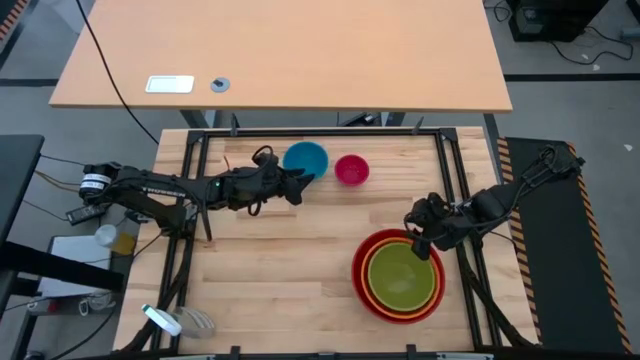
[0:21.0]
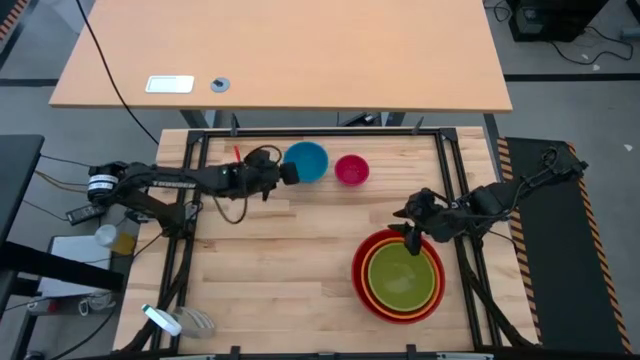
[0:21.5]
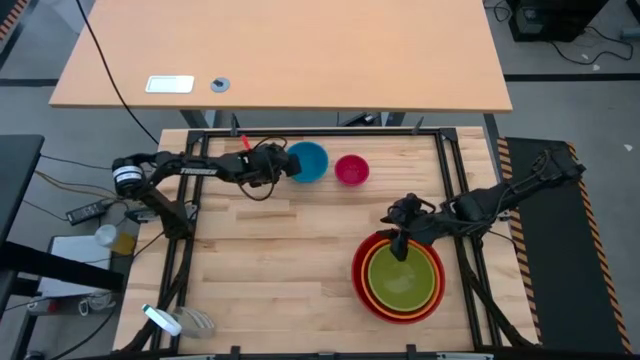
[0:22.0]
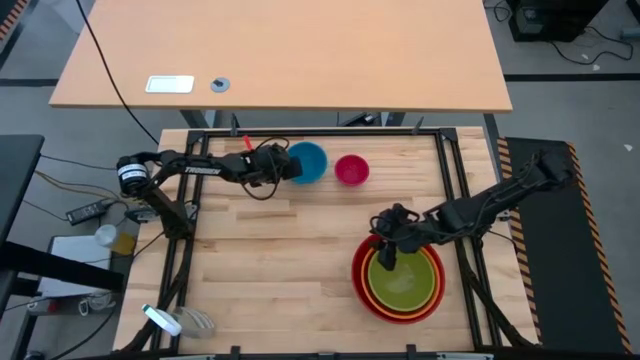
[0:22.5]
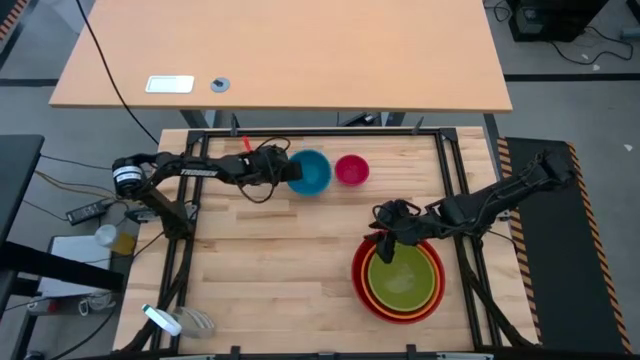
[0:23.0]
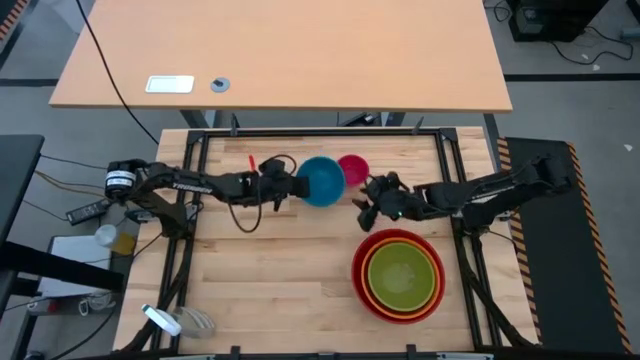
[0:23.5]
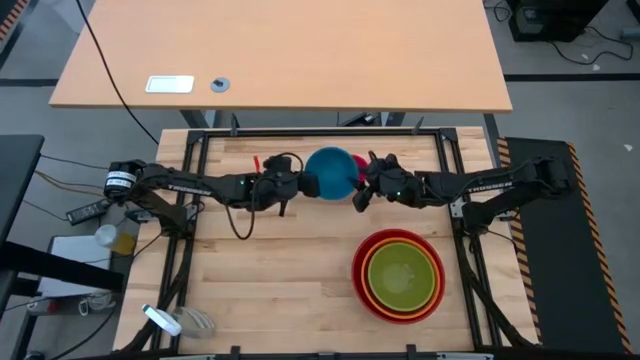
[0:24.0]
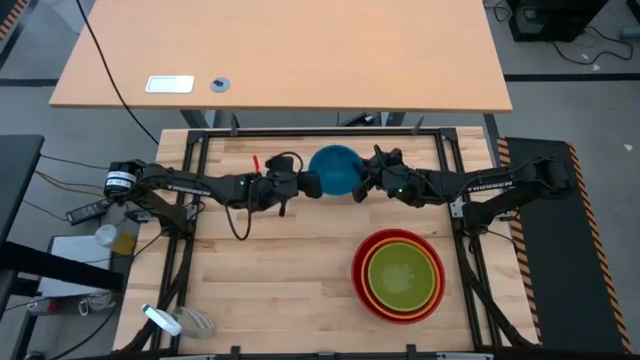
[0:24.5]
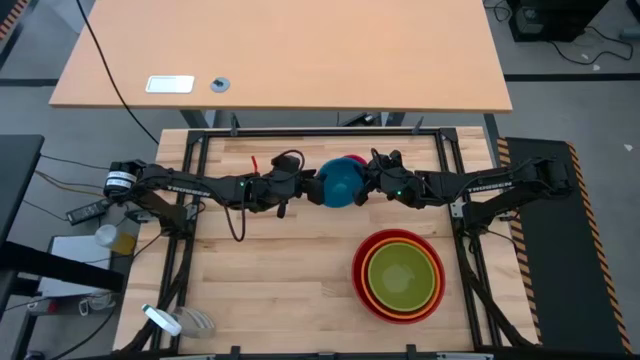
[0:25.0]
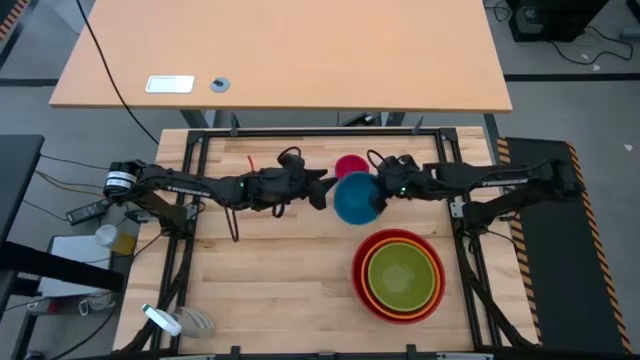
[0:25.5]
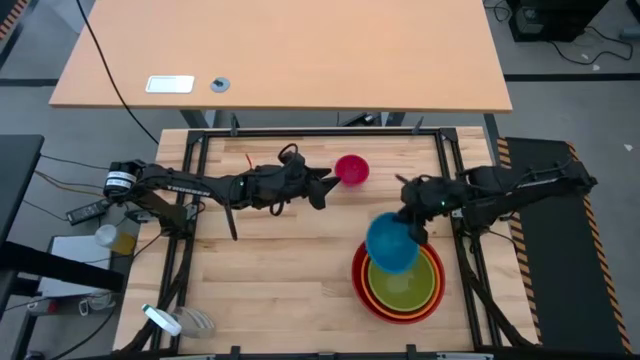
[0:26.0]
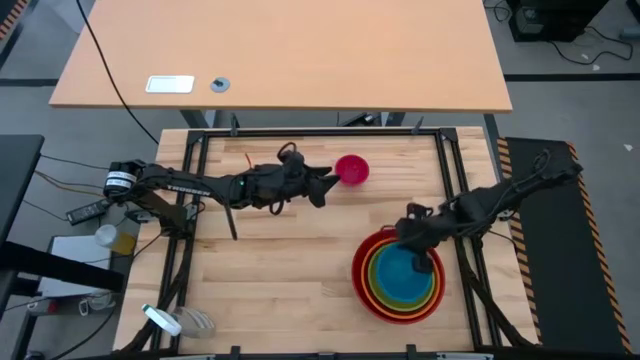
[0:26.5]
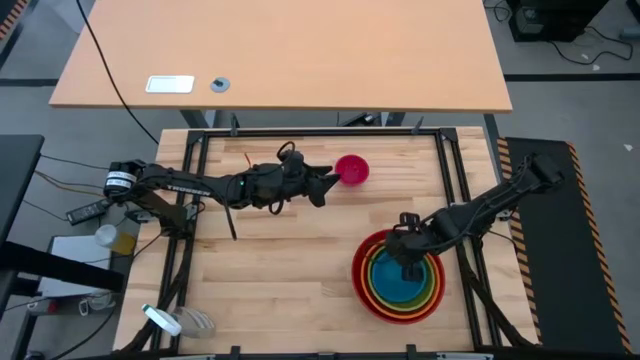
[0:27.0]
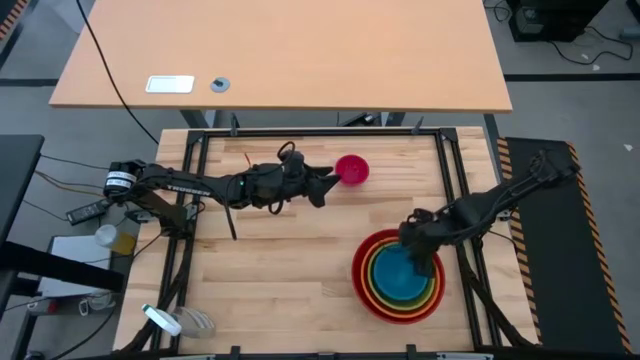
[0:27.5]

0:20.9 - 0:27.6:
Stack the blue bowl on top of the green bowl

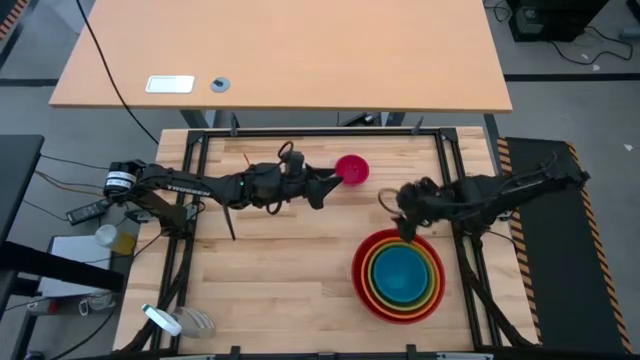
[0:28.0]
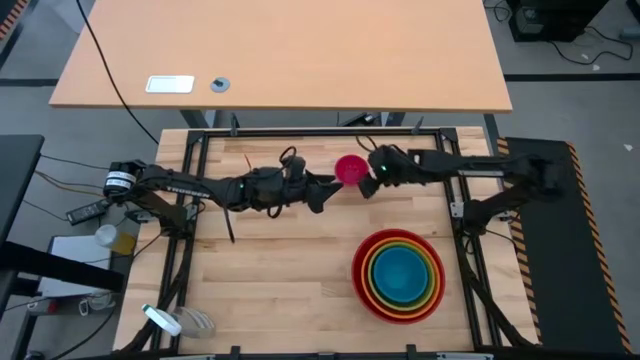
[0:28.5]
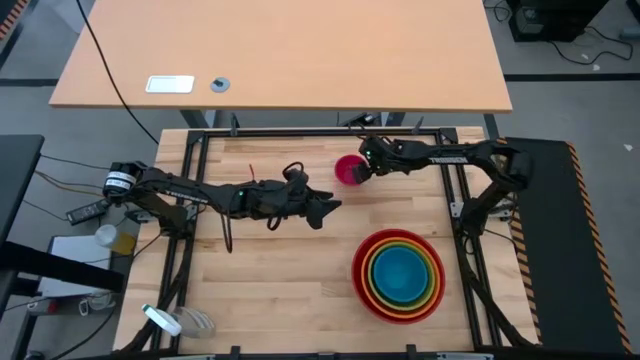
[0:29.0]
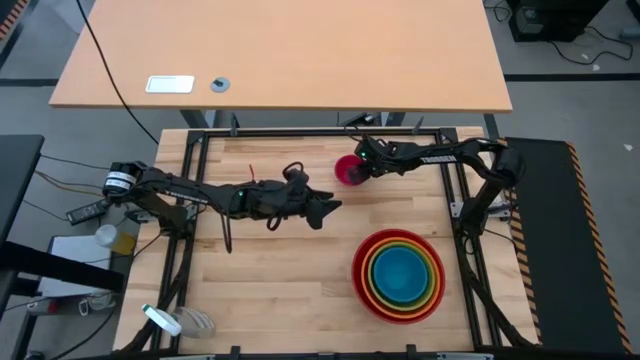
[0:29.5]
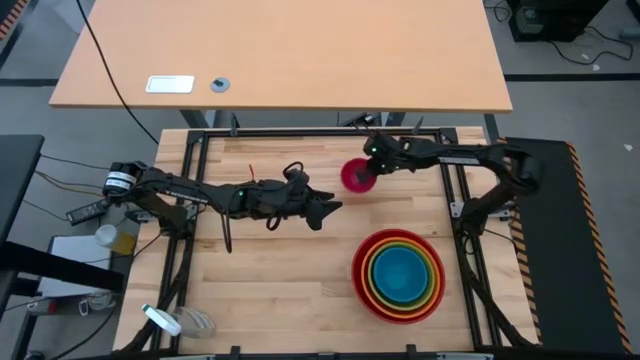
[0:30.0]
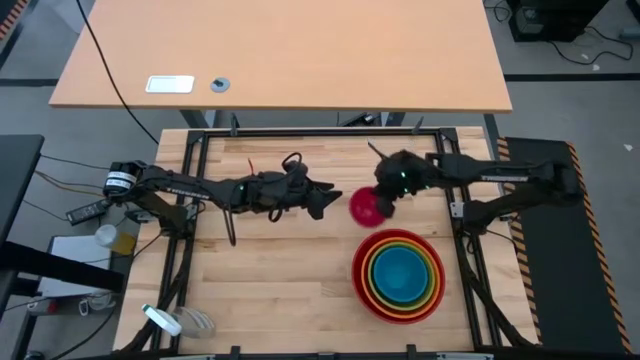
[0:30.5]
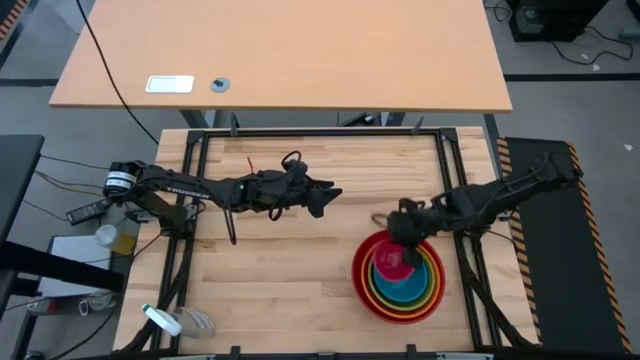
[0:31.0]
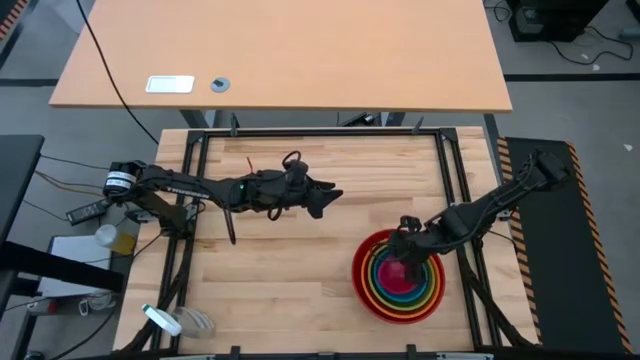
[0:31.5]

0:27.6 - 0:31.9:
Stack the pink bowl on top of the blue bowl

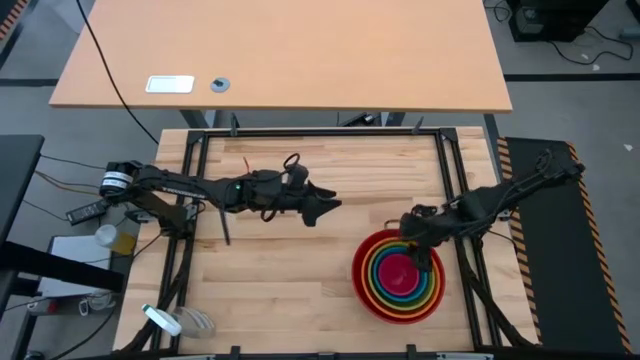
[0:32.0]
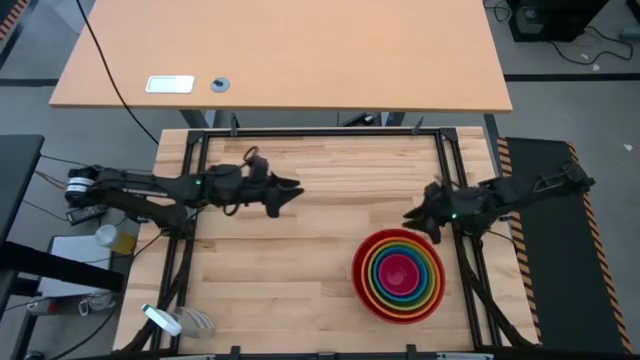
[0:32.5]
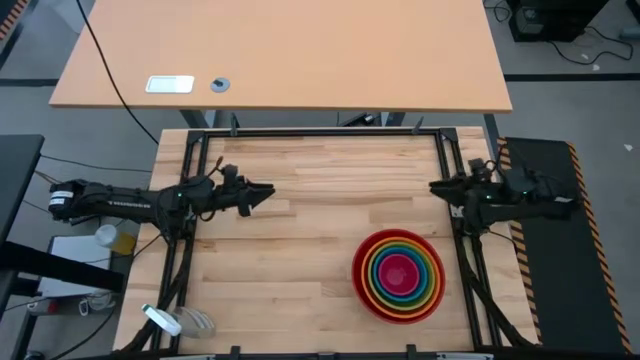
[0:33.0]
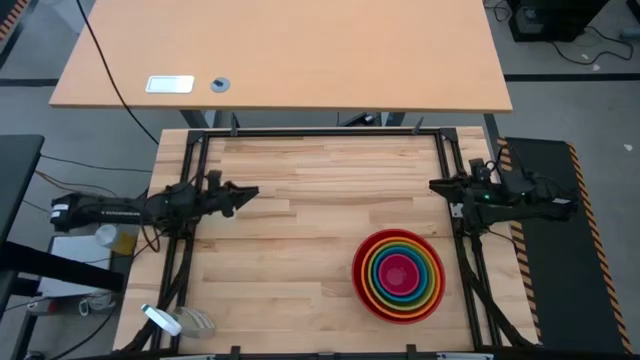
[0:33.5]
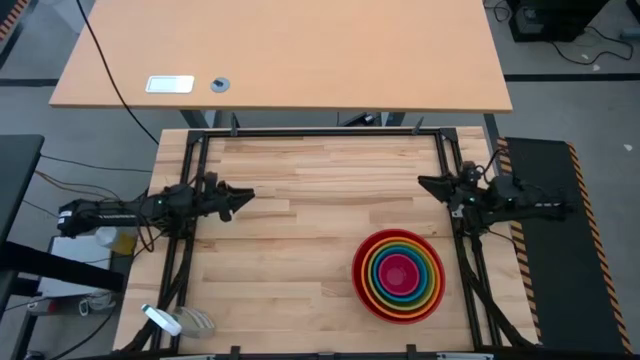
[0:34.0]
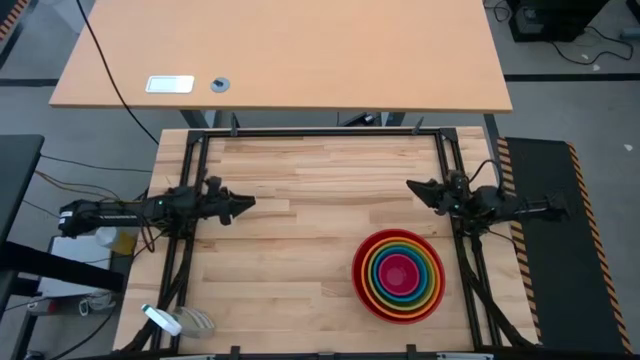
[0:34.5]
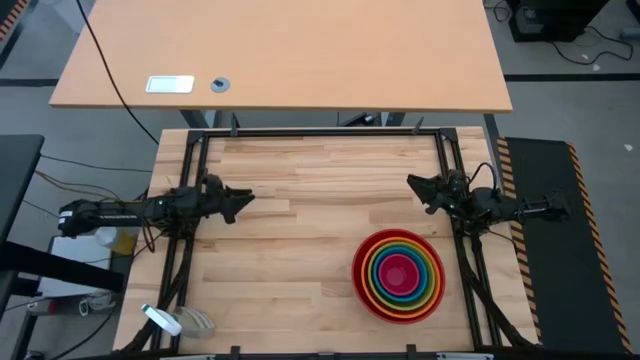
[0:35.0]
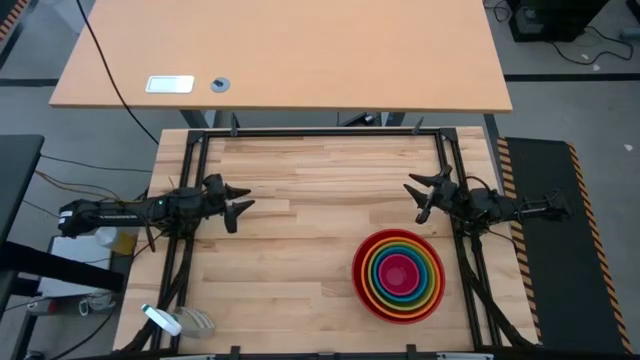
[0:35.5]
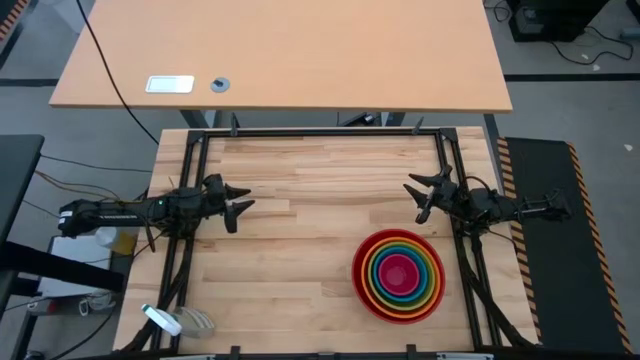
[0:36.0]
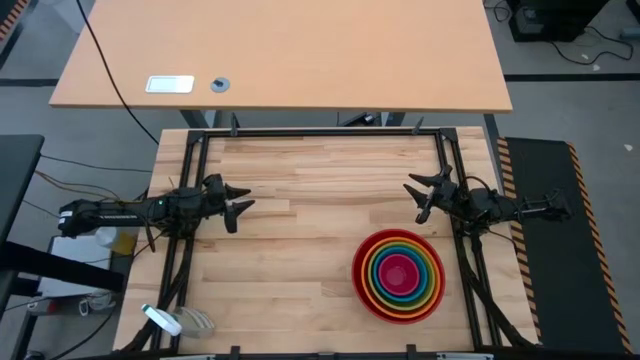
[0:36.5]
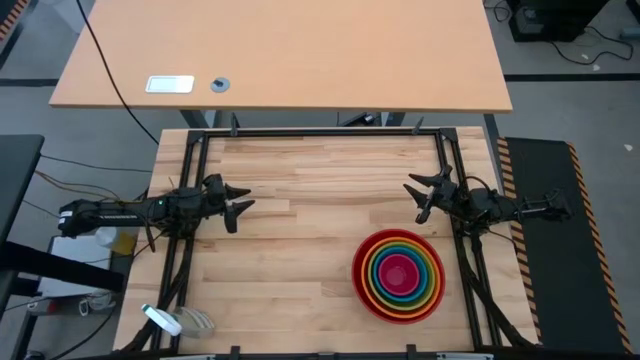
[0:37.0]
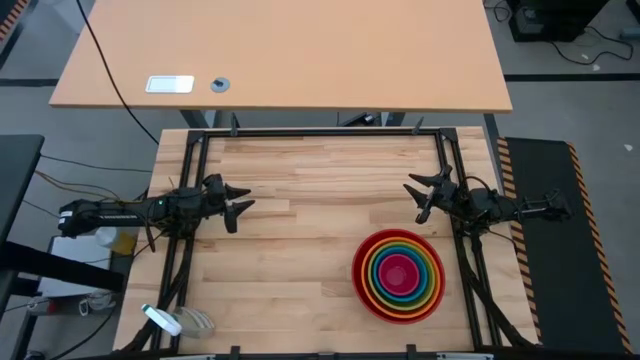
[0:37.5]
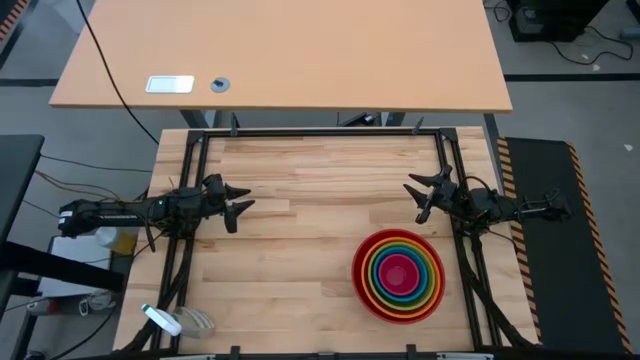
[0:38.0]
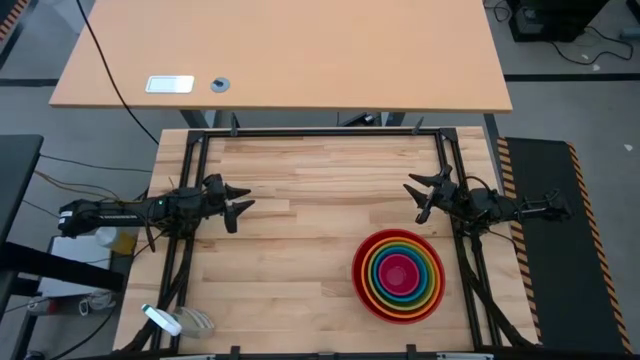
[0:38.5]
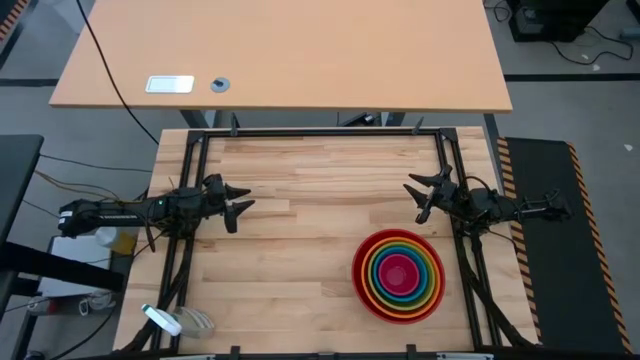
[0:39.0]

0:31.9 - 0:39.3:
Return to Home Position
